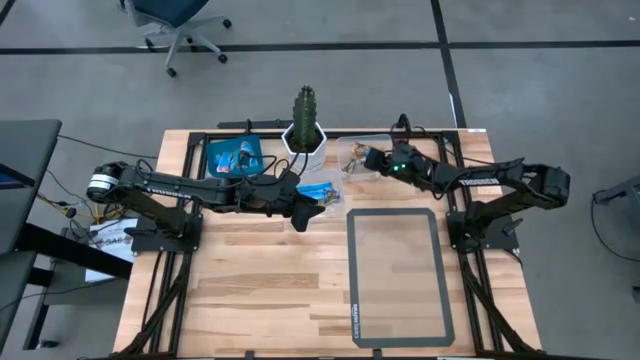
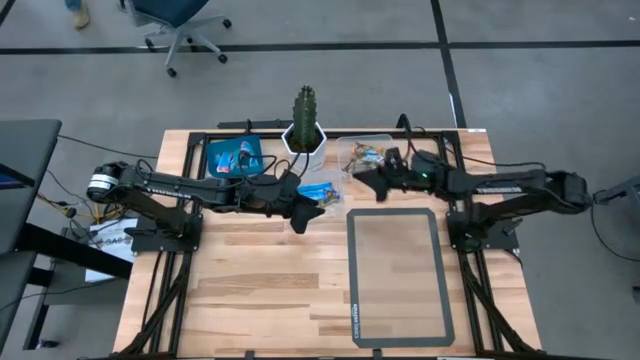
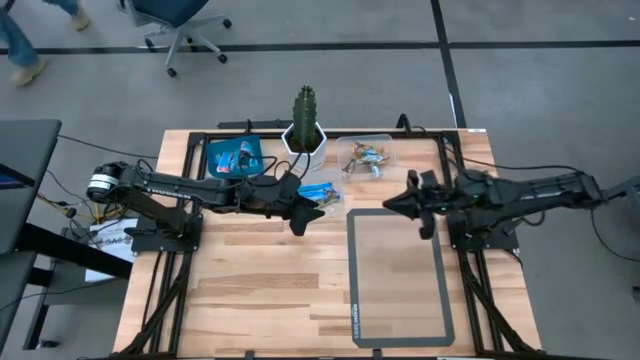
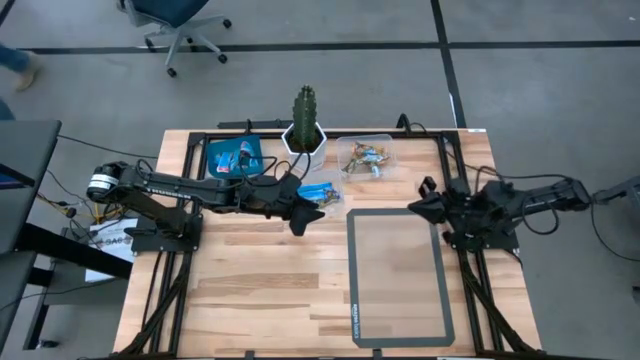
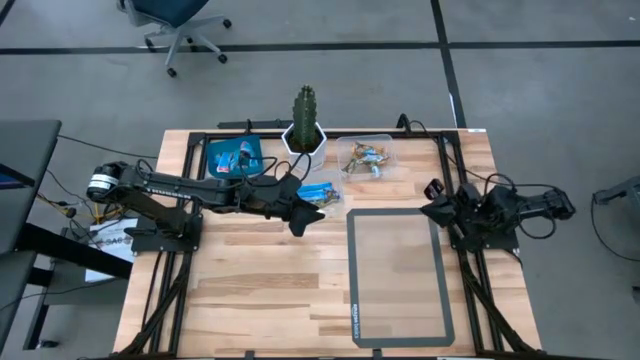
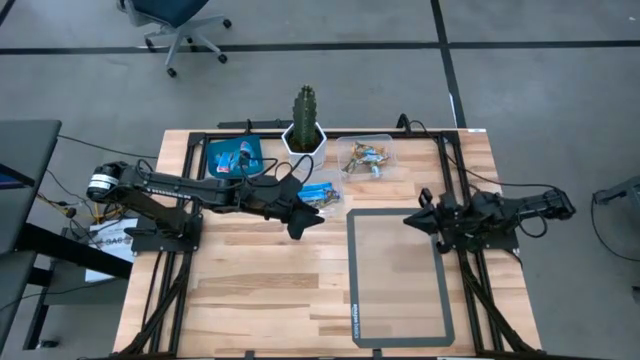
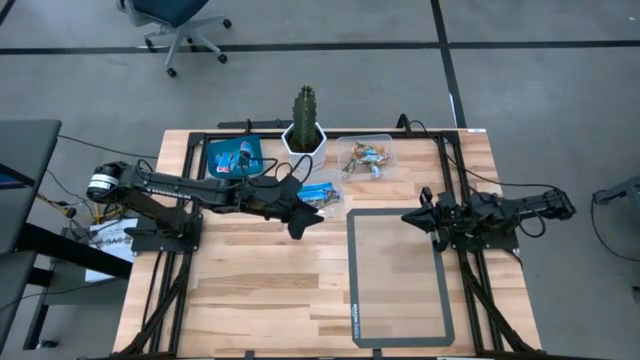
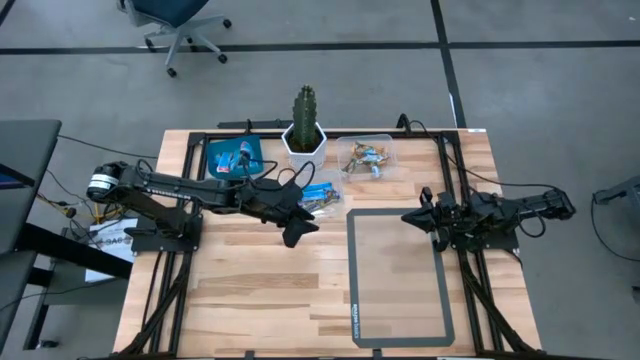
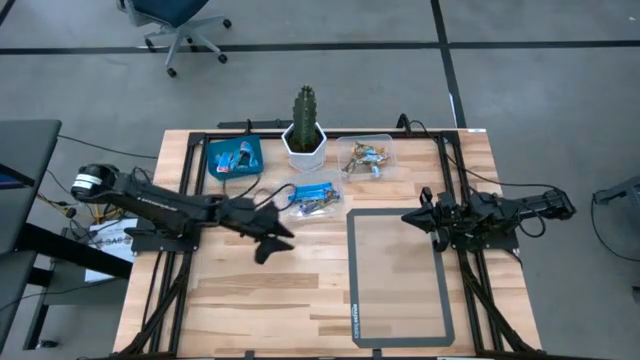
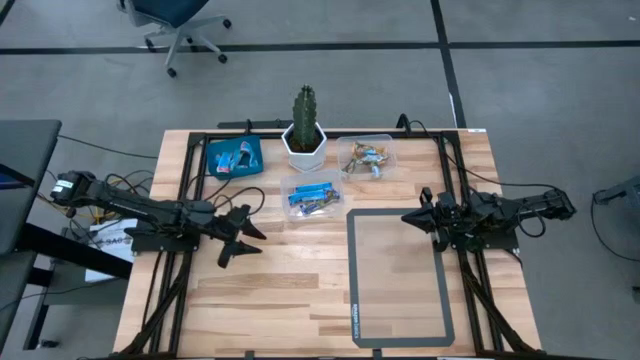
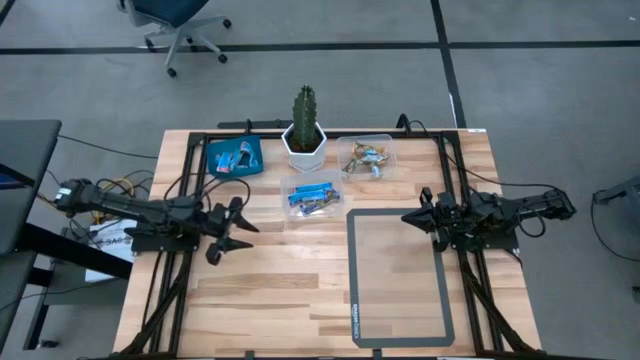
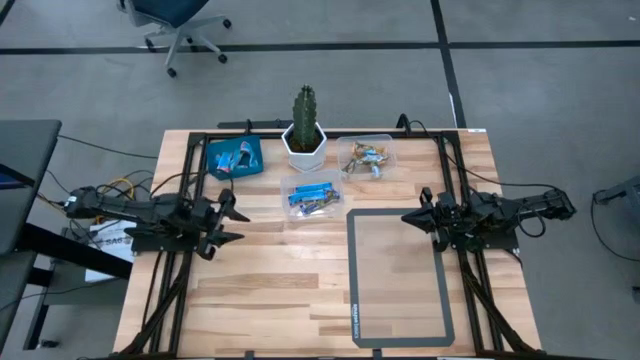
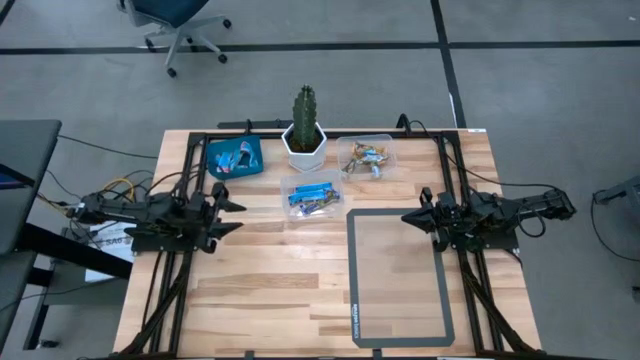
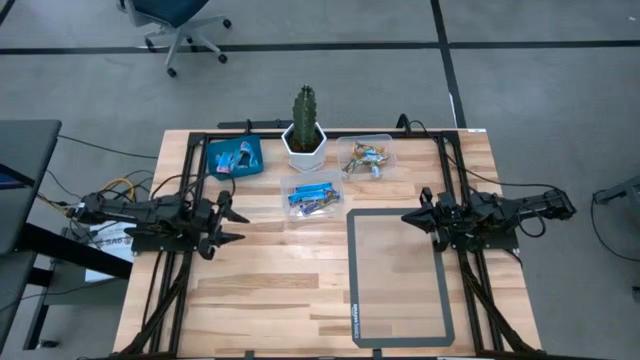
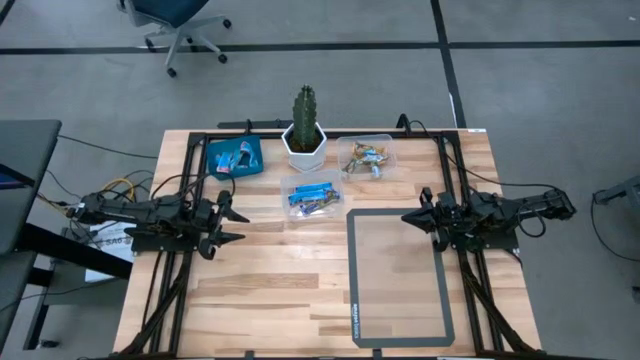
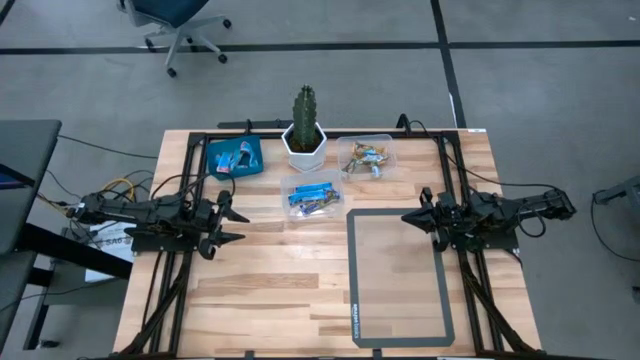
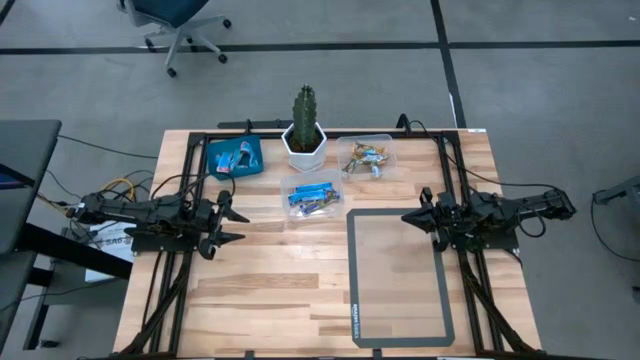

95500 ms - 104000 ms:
Task: Pick and place Granola Bars by type
Return to Home Position

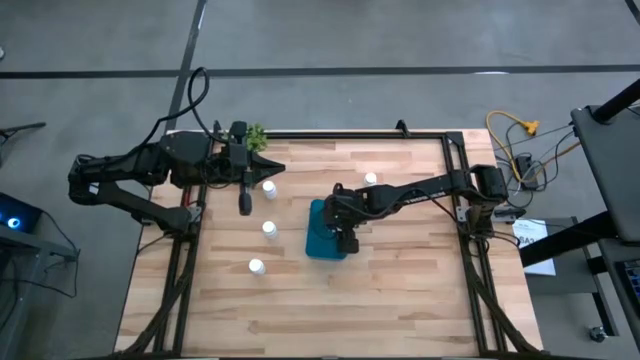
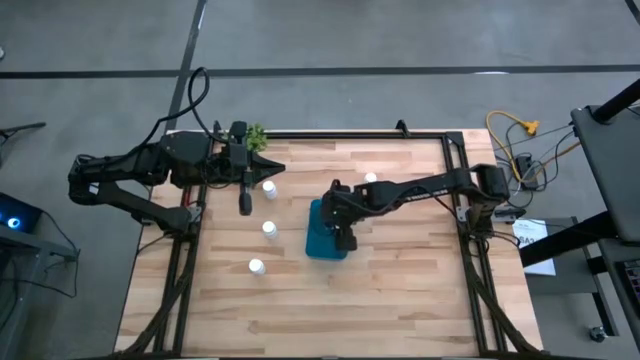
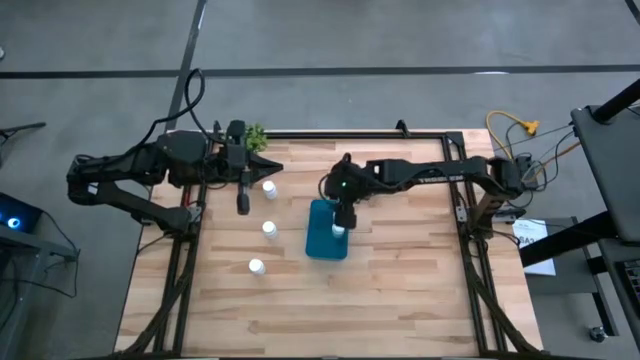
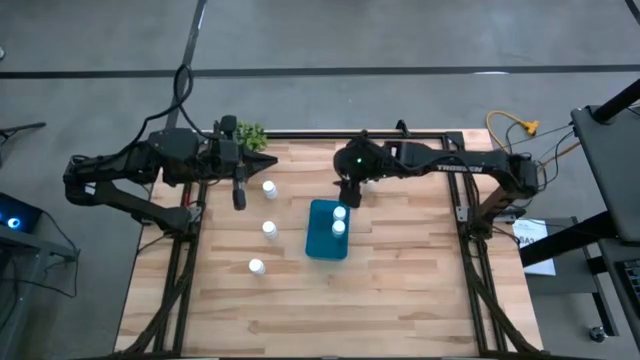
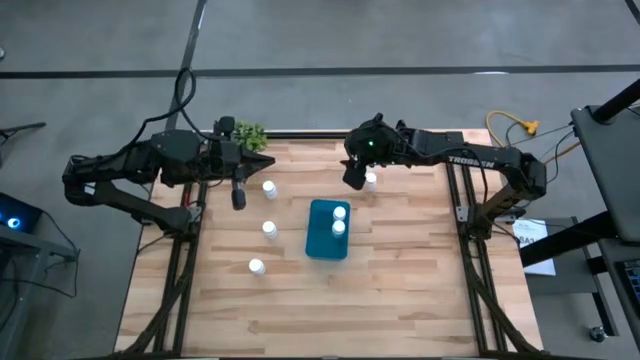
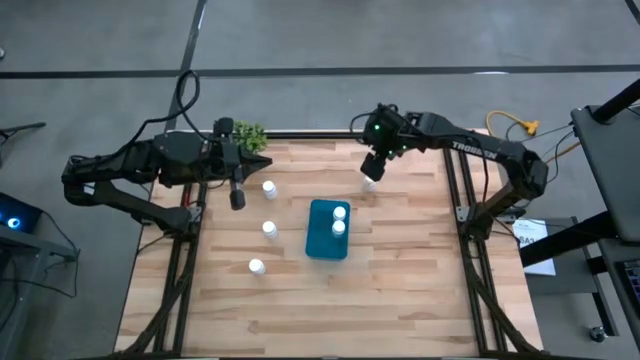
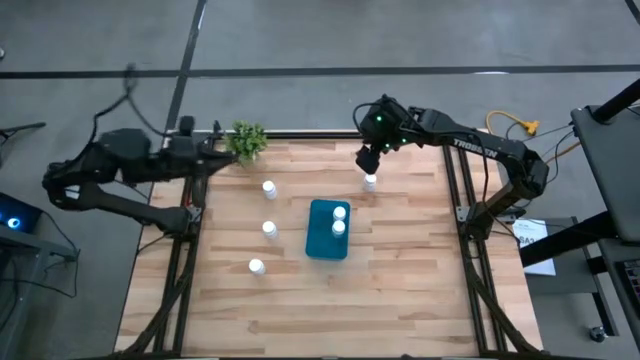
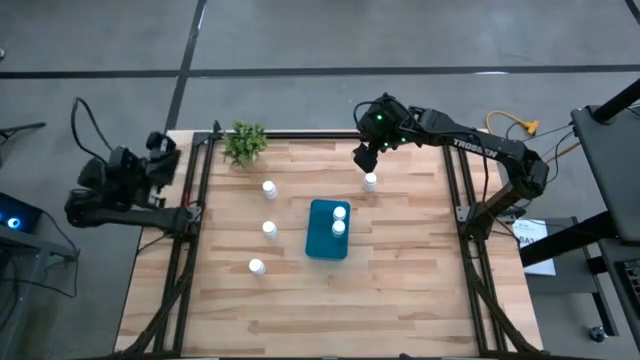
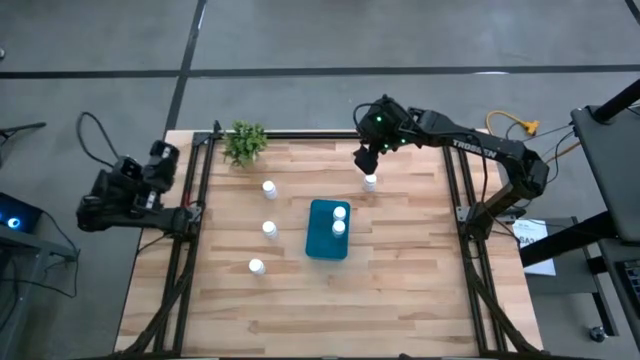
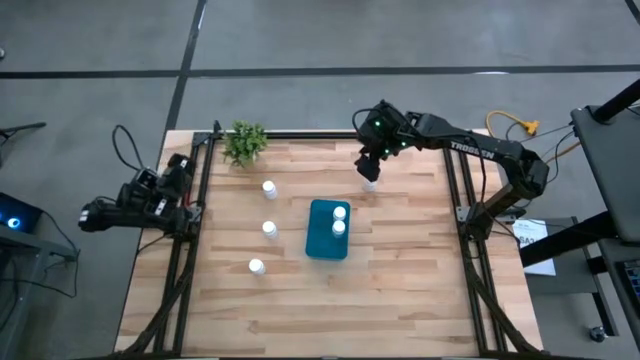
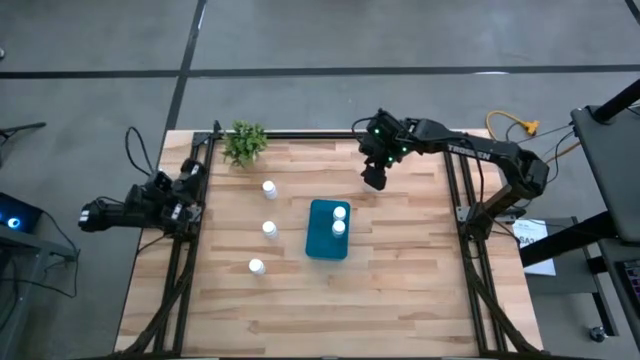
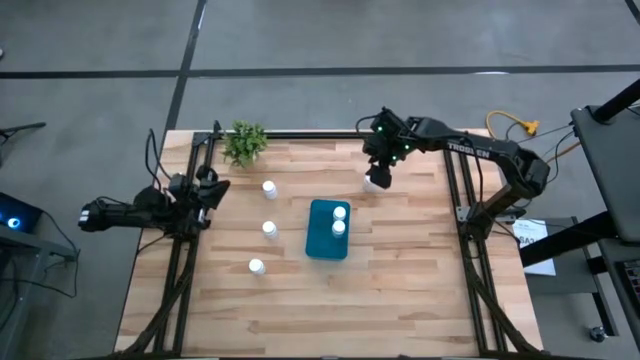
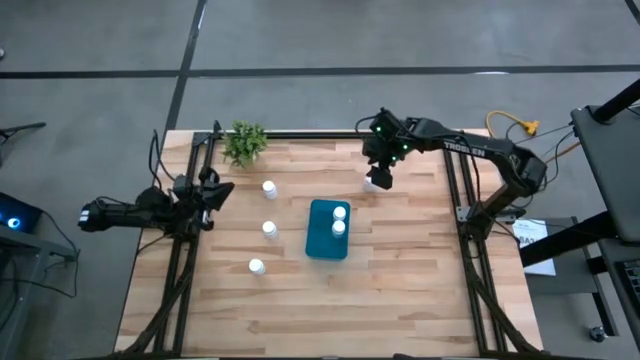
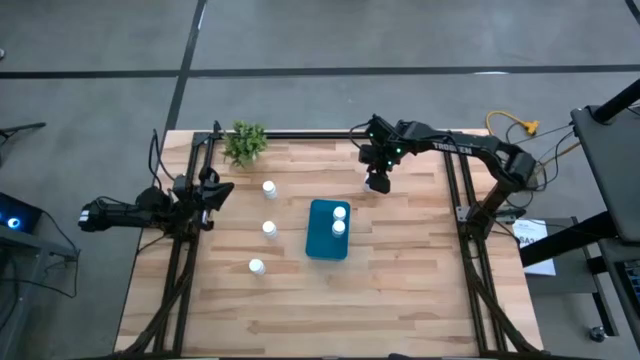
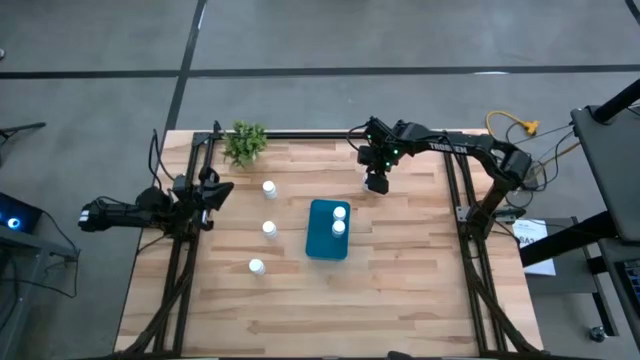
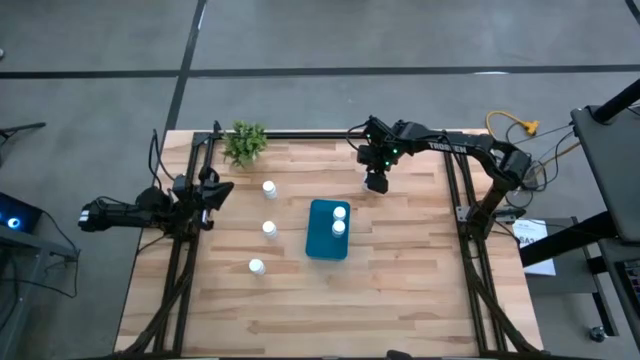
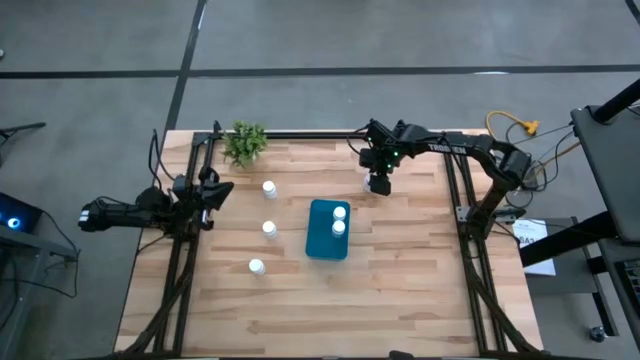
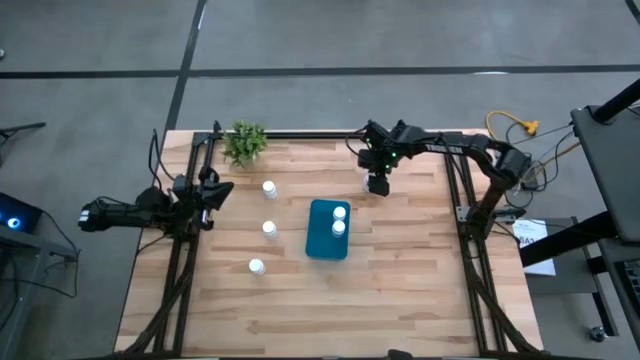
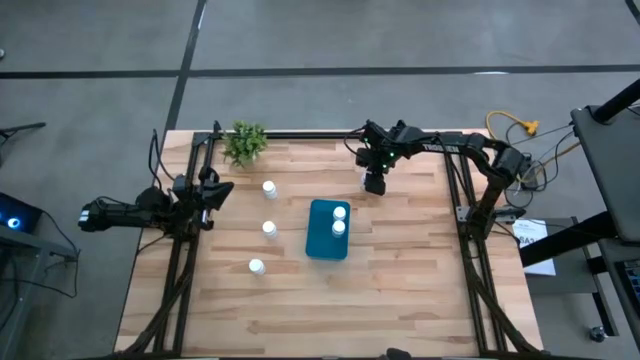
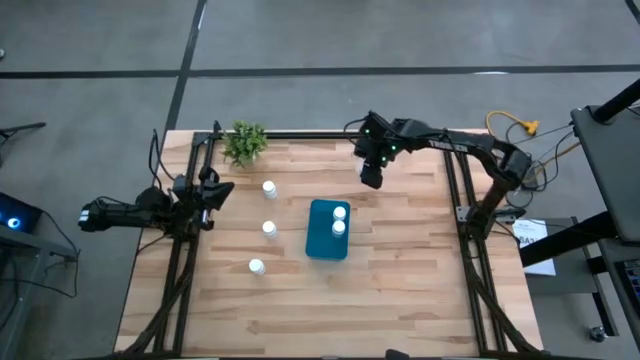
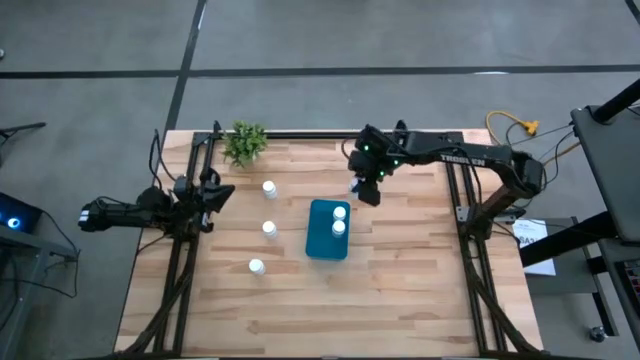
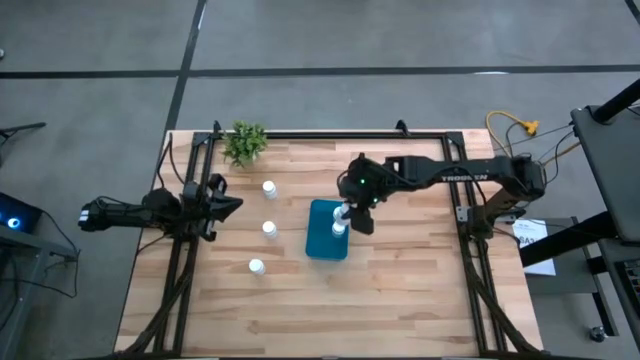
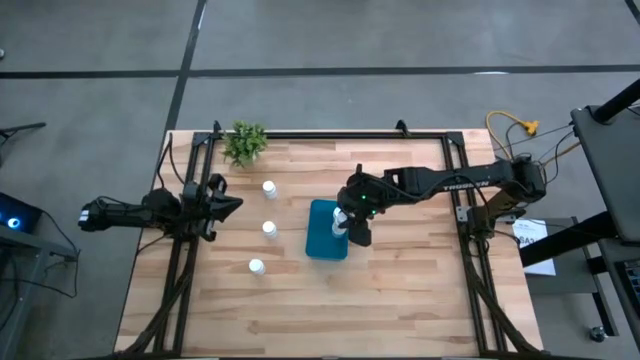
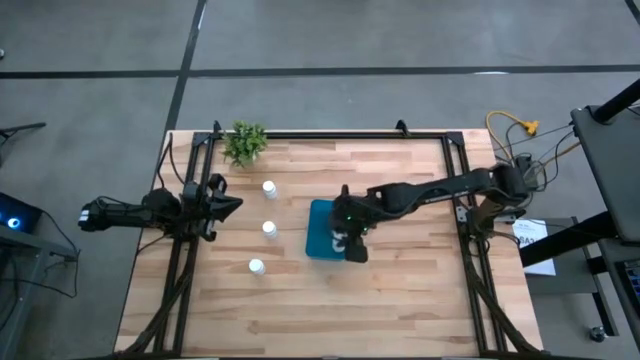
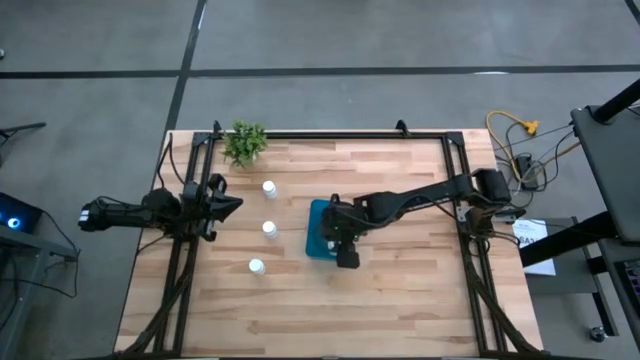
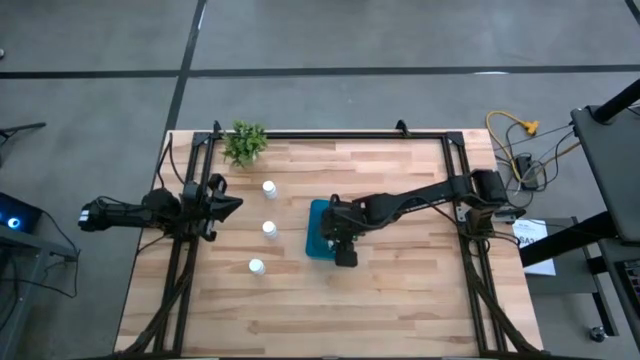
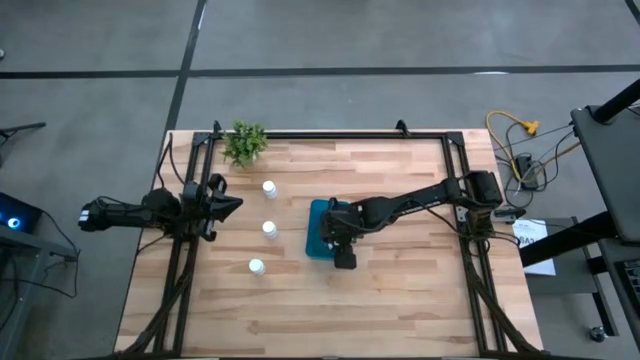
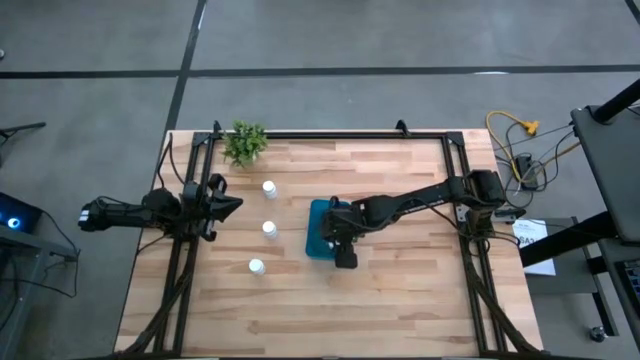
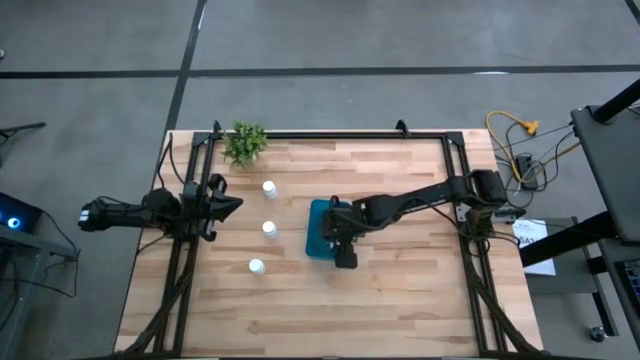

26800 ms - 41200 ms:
Task: Pick and place pill bottles into a basket
Put the white pill bottle into the blue container
